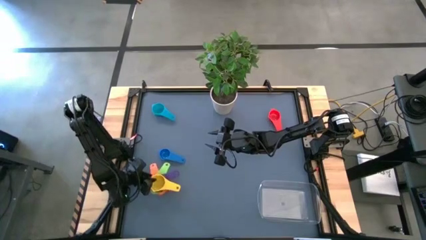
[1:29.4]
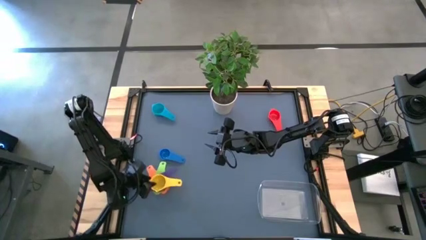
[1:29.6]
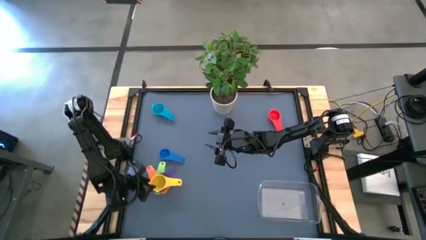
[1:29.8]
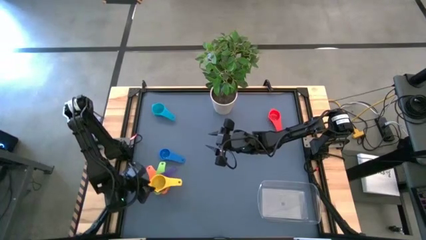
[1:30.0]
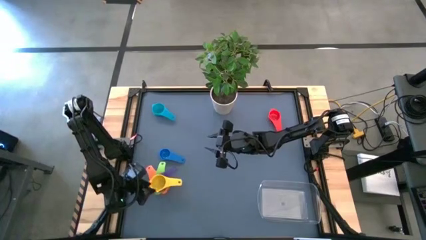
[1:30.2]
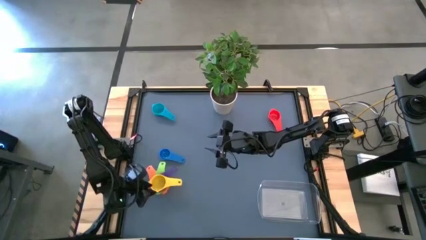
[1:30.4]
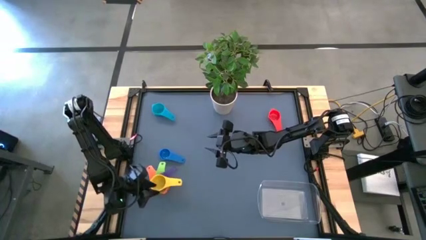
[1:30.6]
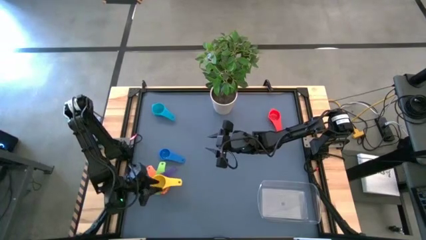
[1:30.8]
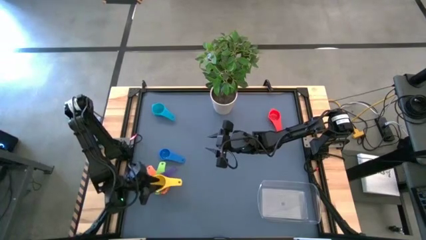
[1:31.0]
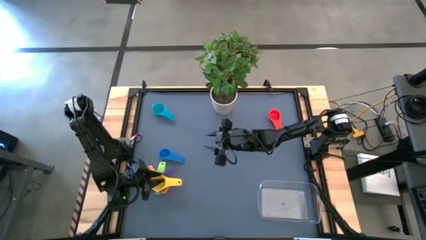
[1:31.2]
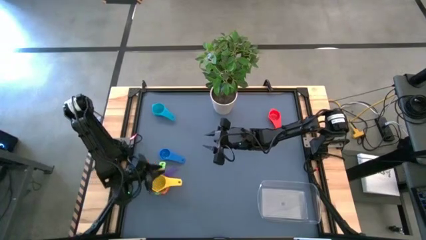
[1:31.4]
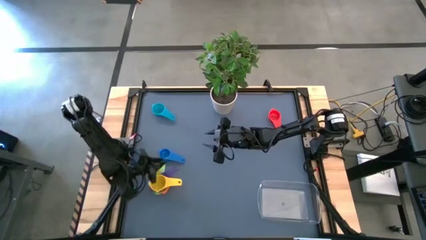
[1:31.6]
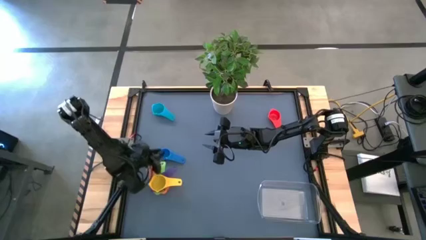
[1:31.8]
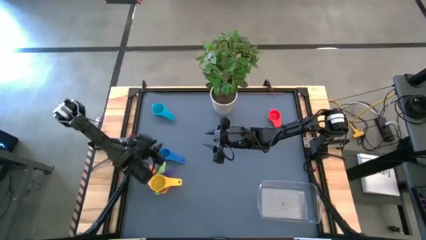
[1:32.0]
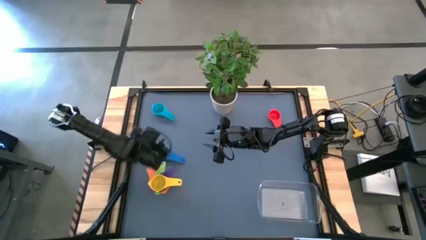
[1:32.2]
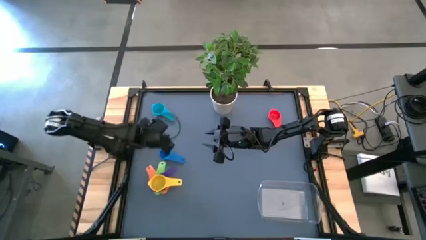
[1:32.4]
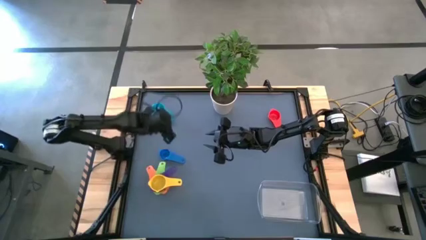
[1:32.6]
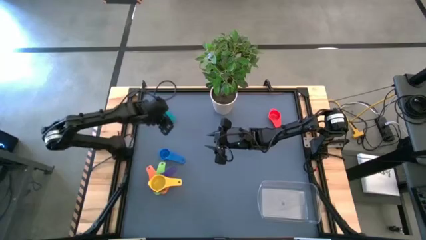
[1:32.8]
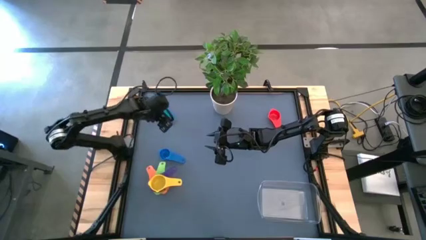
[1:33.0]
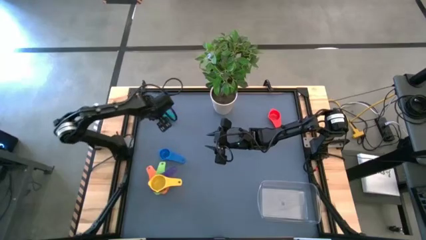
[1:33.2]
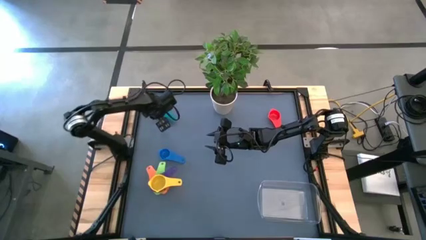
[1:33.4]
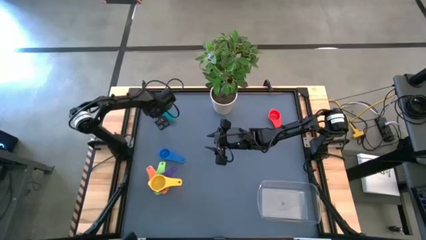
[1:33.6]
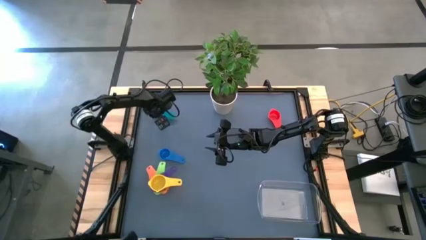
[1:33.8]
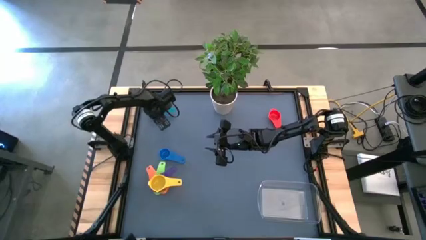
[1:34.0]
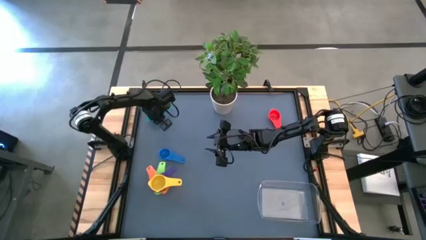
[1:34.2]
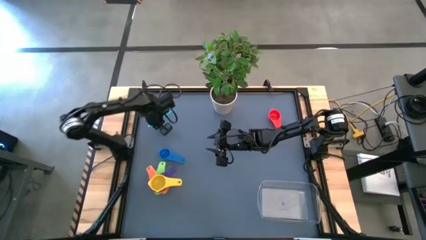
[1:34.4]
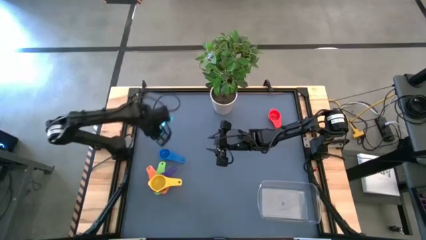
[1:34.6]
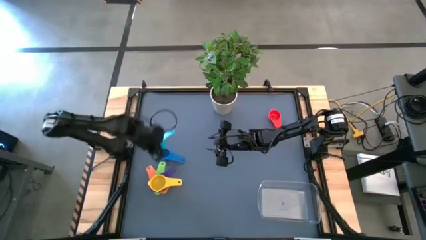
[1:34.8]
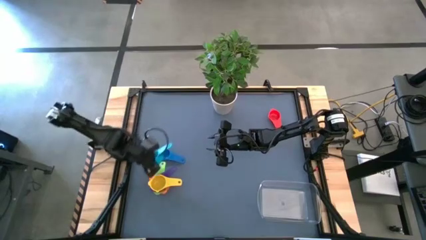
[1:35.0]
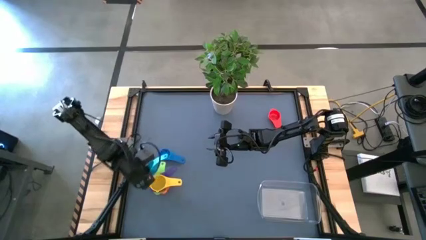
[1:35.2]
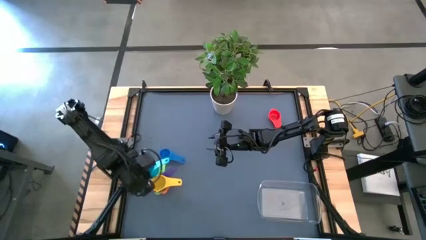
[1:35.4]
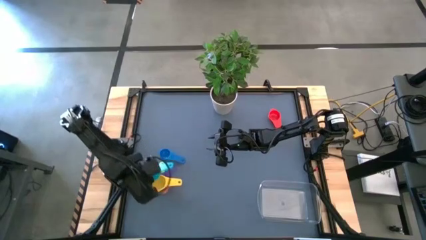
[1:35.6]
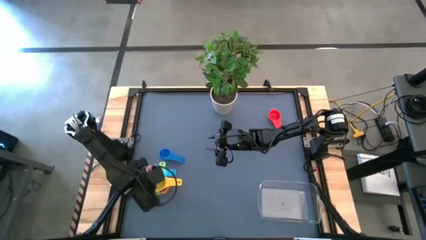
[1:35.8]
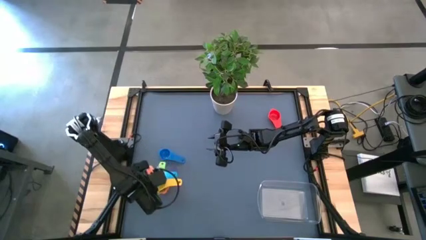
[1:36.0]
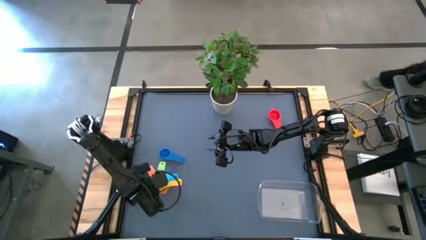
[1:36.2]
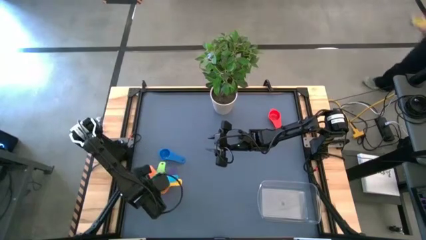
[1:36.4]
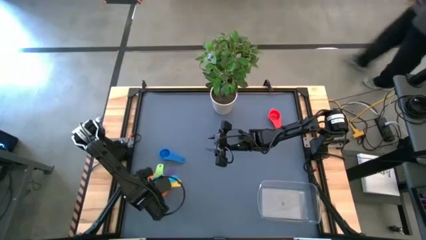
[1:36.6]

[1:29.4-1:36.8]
Task: Nest measuring cups in basket
Stack the light blue measuring cup on top of the yellow measuring cup

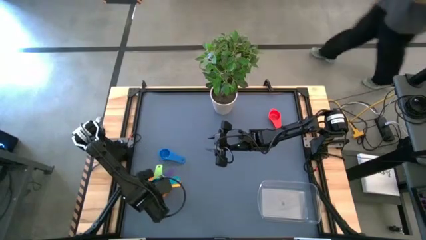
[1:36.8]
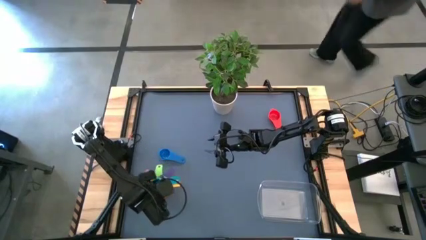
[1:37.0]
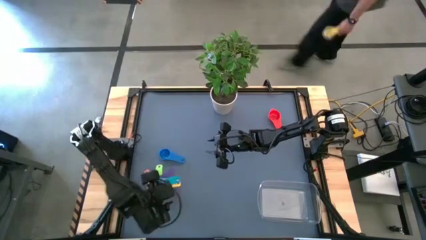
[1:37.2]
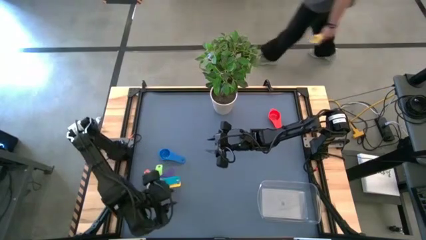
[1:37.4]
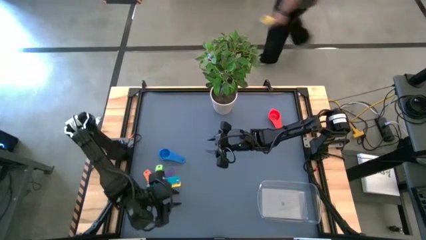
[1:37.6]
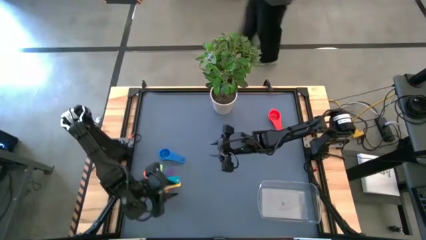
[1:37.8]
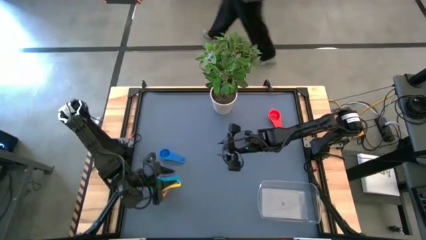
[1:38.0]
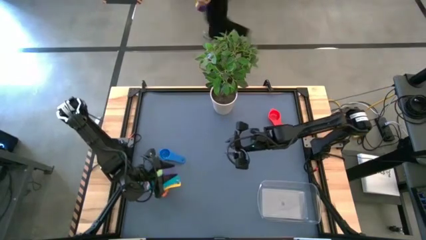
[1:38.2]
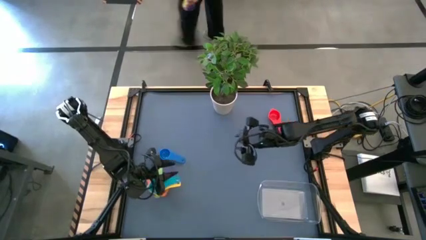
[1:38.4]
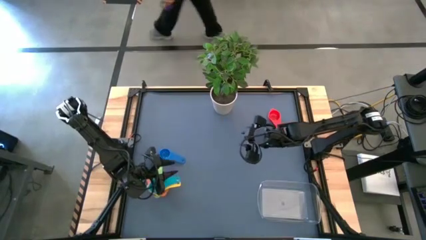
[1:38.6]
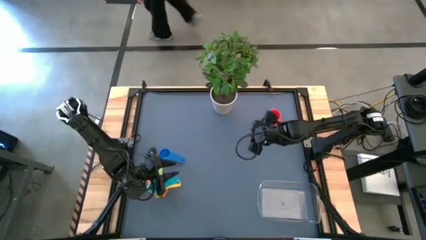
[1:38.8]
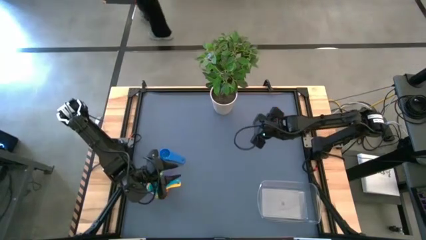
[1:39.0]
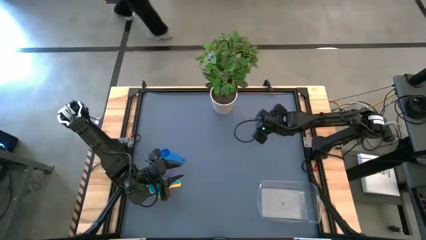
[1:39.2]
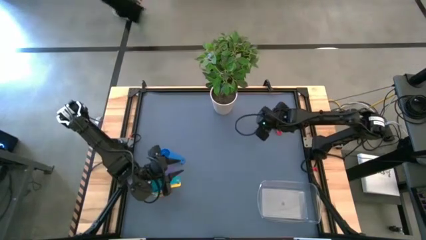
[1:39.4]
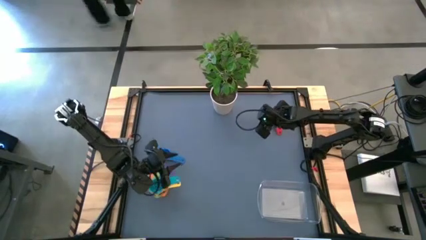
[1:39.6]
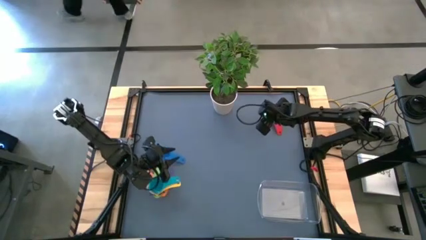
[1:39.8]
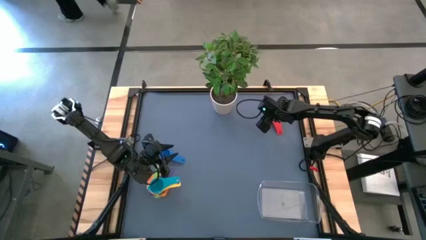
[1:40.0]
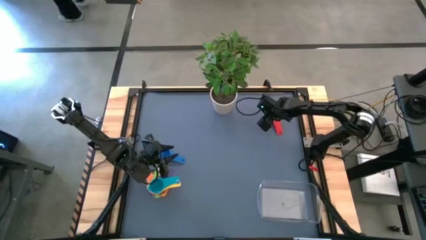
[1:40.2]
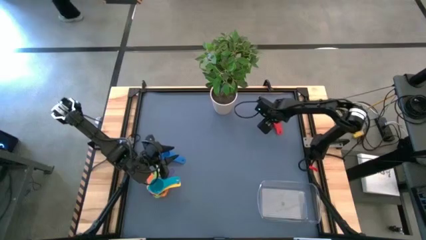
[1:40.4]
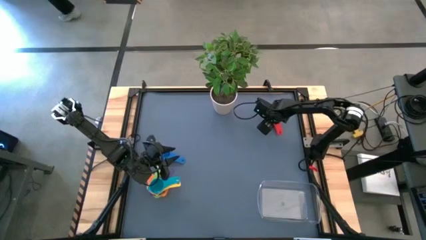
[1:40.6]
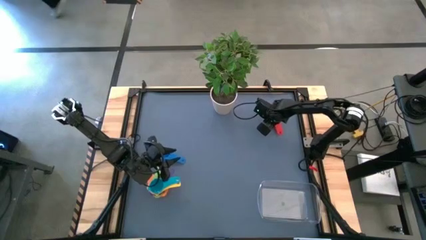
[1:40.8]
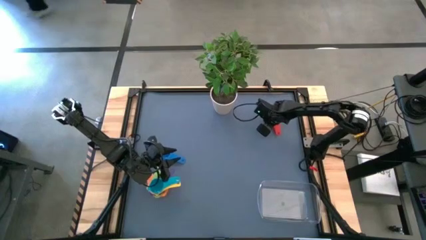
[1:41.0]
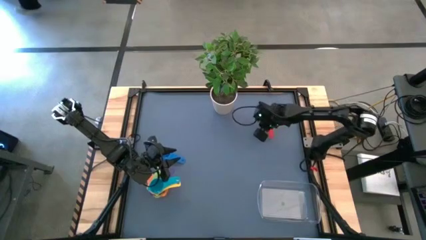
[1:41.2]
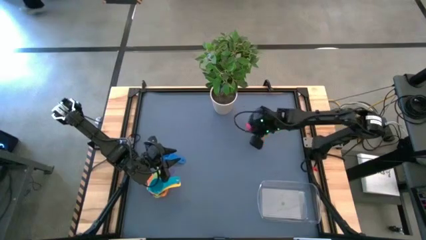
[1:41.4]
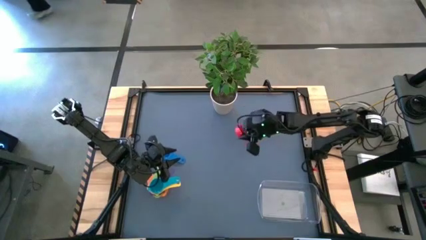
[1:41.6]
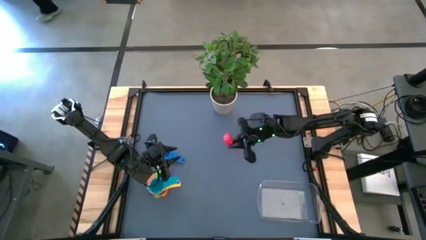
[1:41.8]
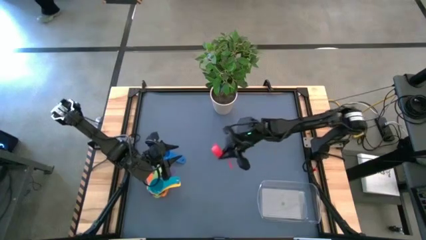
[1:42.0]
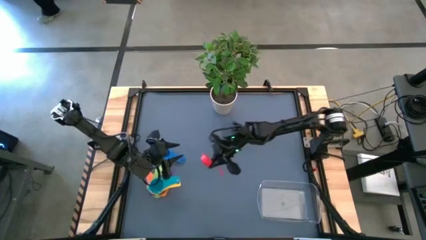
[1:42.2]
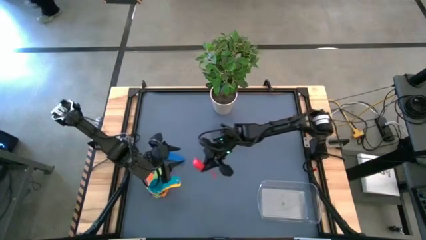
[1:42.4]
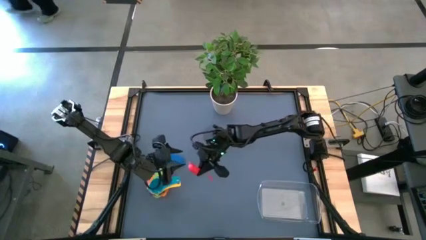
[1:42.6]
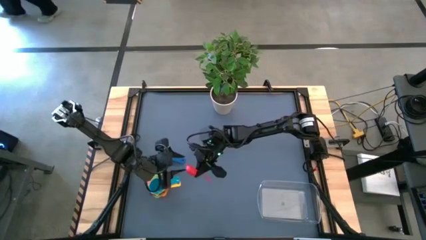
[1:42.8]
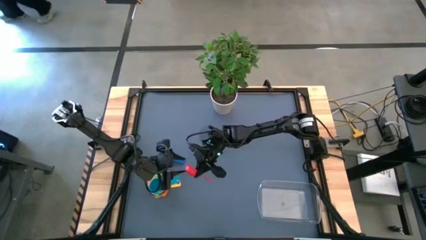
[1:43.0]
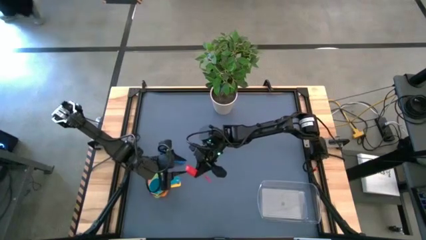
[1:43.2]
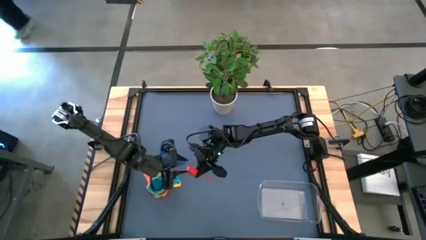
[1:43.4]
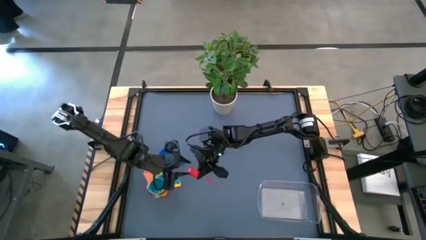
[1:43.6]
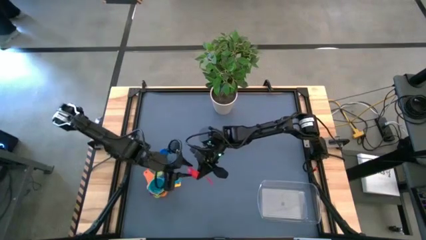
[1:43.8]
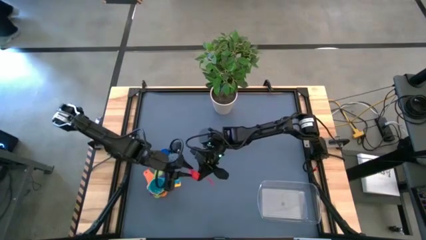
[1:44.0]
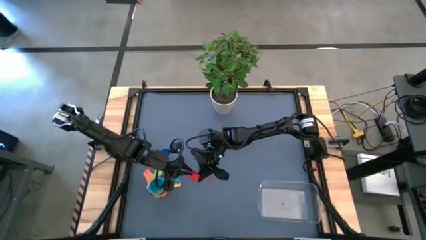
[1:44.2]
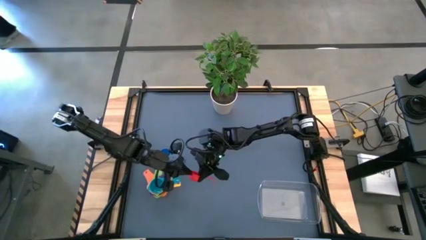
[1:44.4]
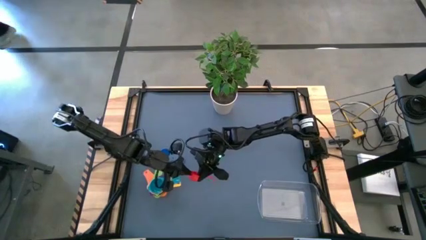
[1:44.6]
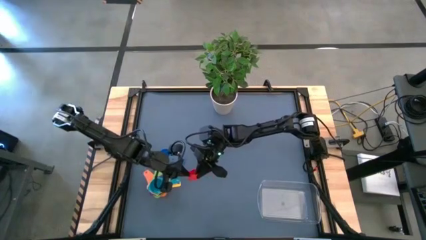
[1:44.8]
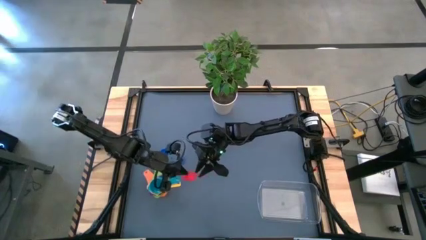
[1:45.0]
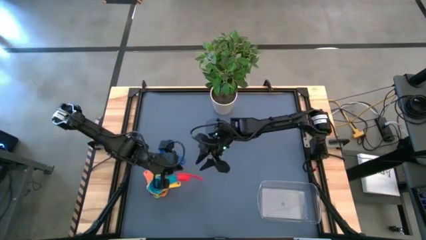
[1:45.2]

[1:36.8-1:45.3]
Stack the red measuring cup on top of the light blue measuring cup
